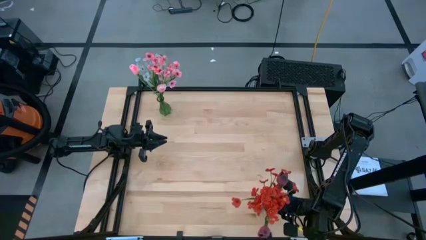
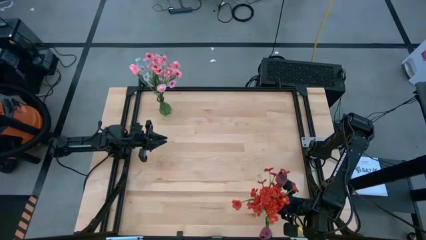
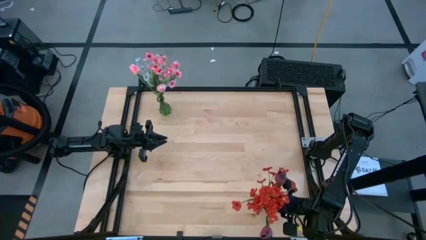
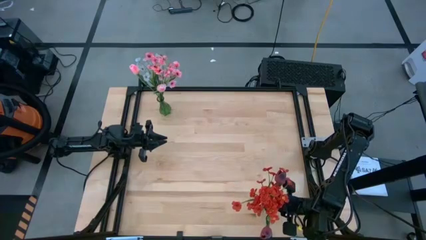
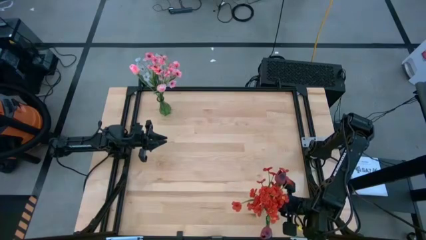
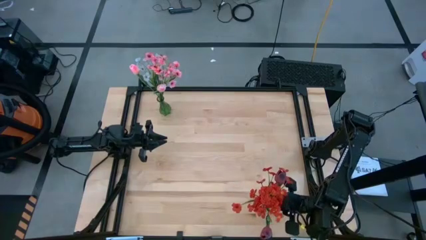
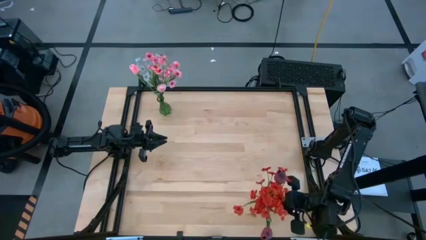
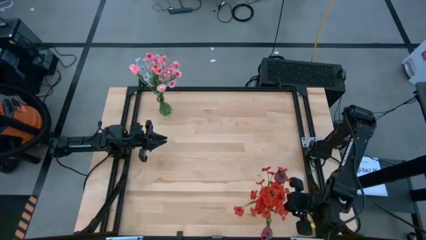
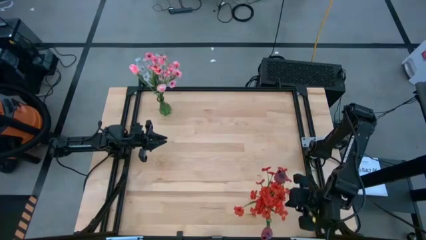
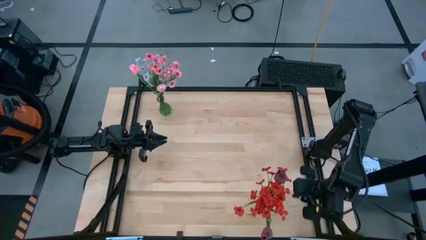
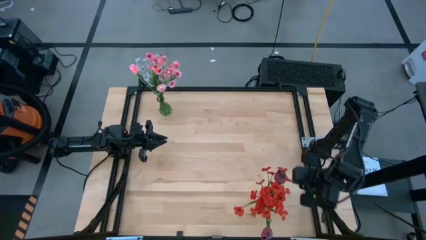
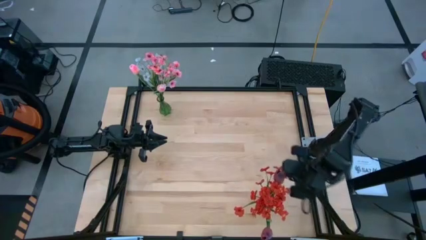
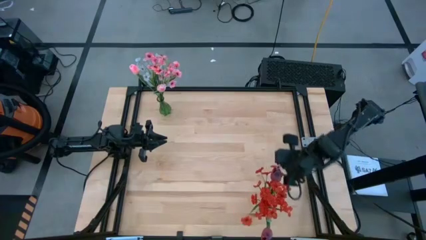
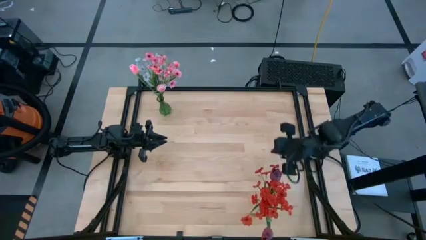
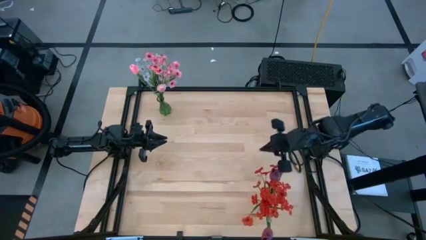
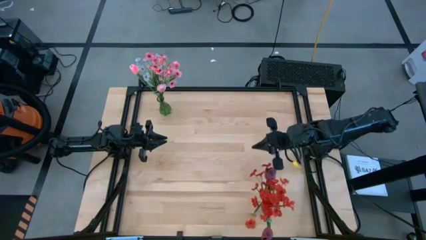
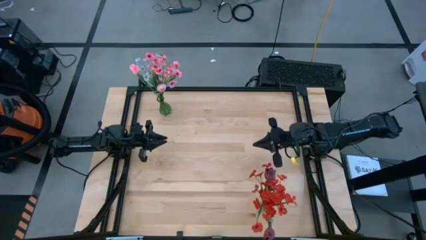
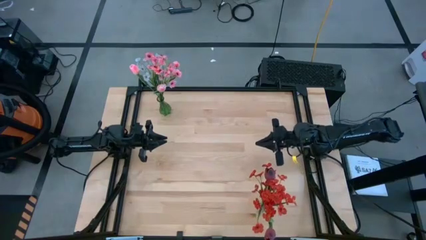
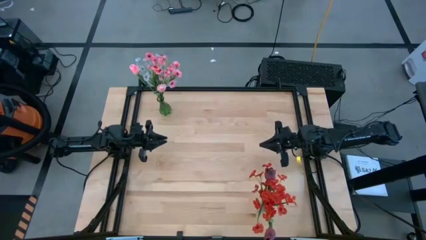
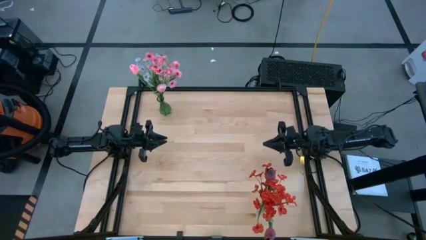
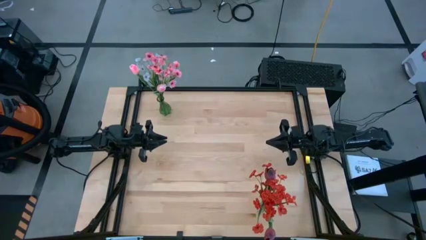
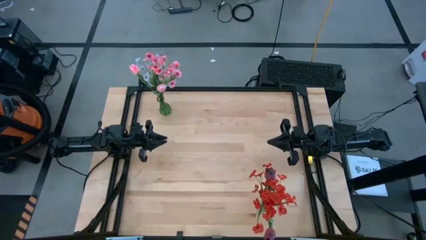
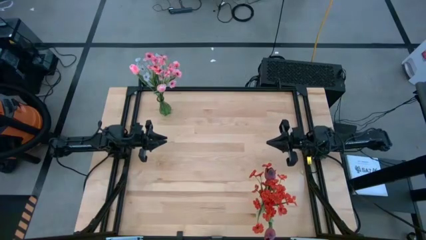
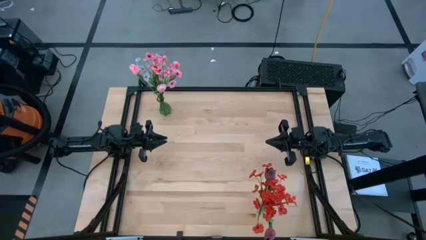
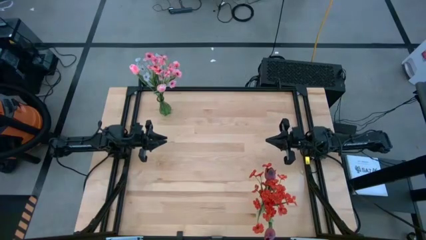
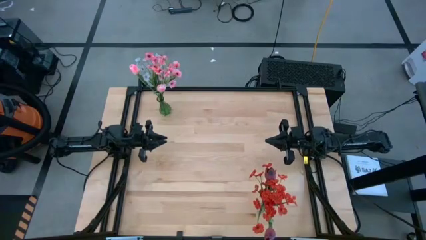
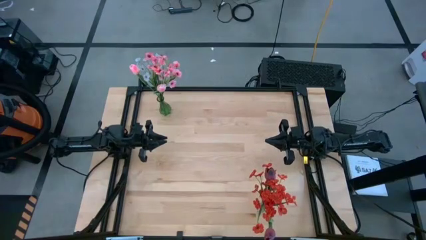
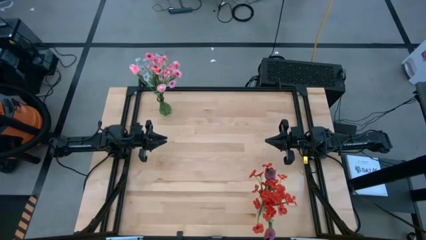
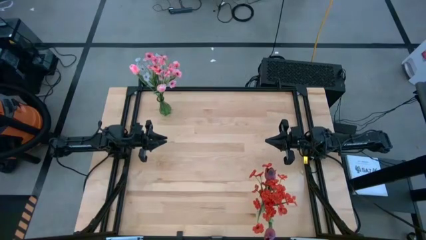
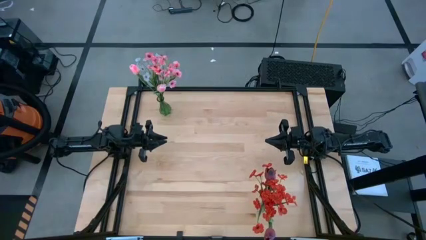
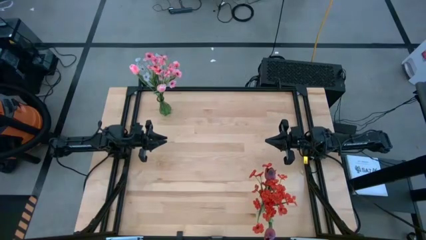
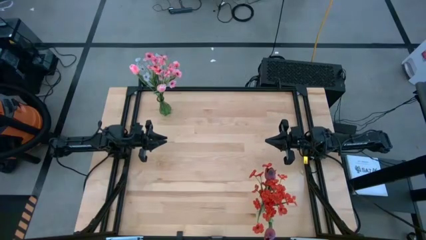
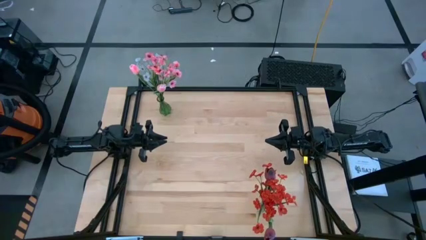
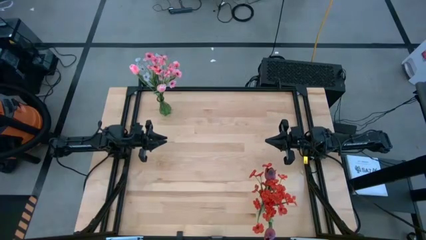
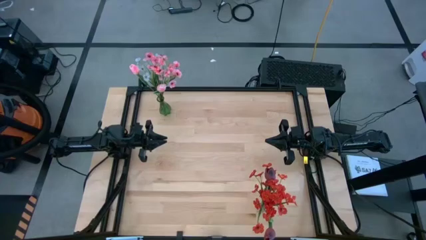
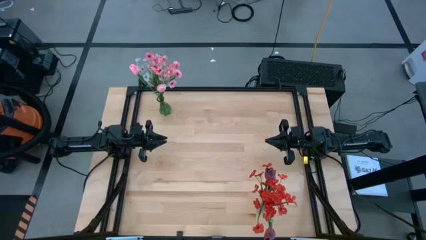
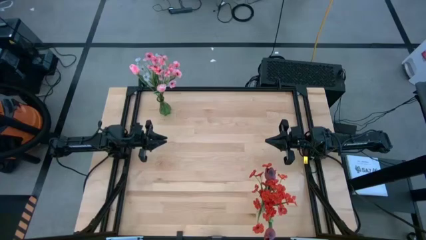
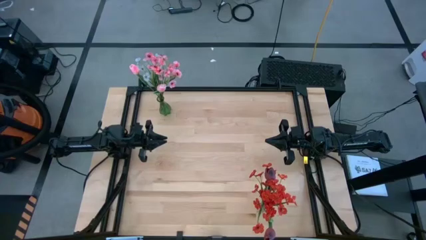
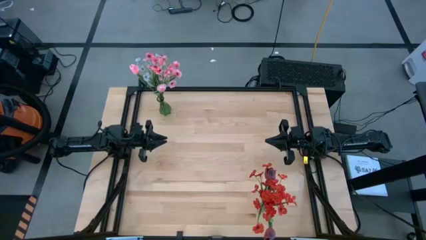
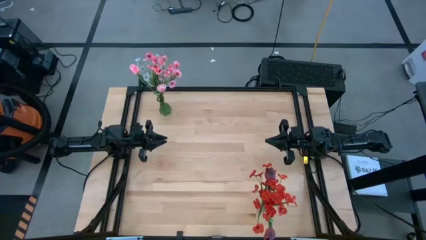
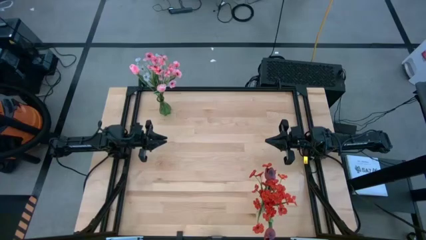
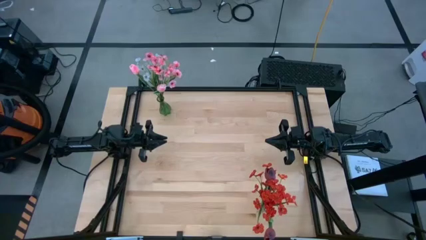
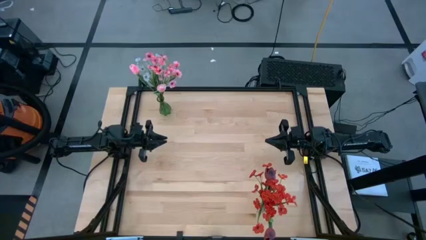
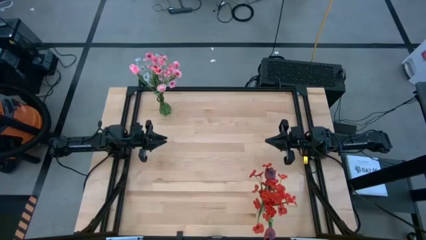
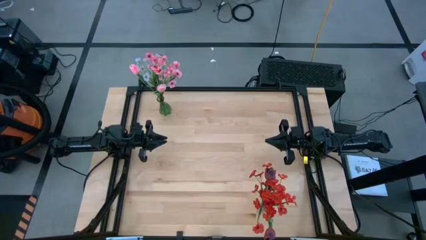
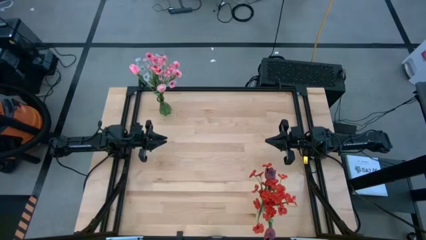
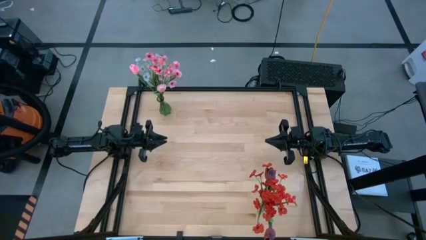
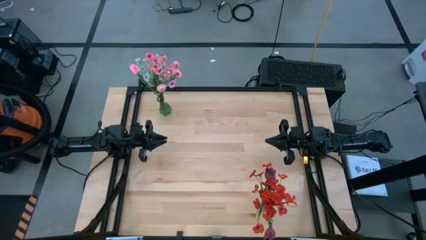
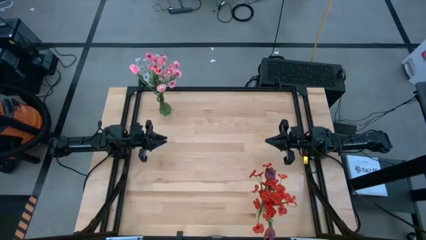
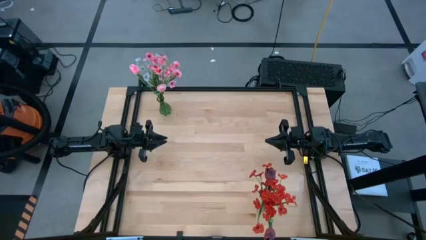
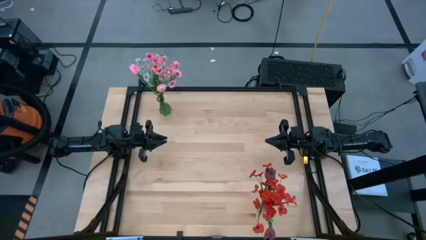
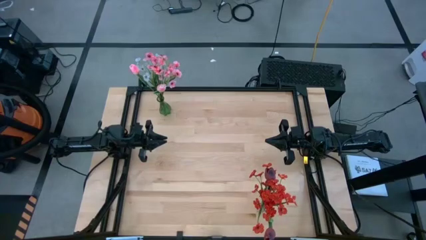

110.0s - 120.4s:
Task: Sort flowers into vase by color
Return to Home Position

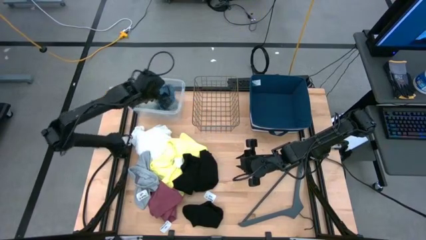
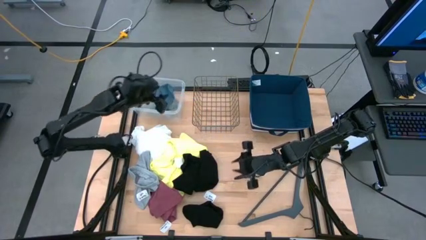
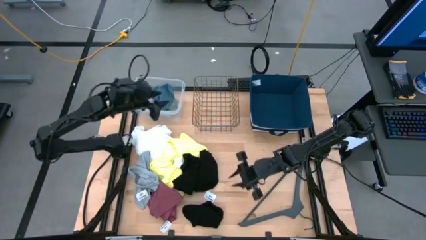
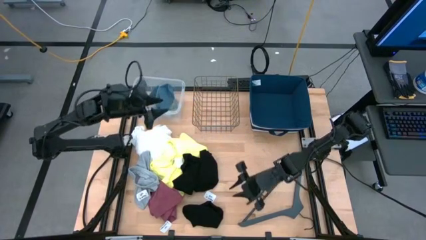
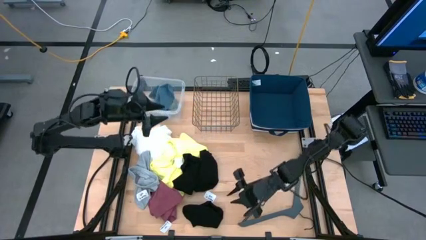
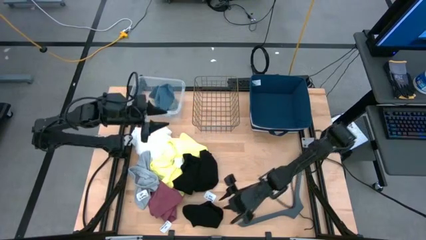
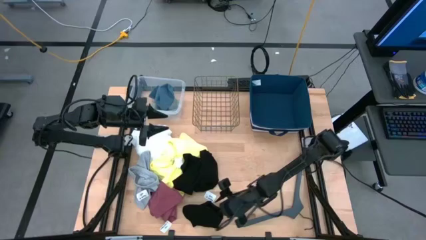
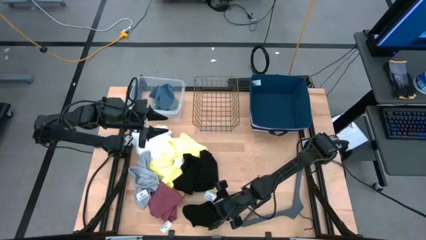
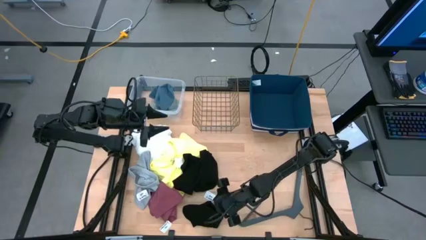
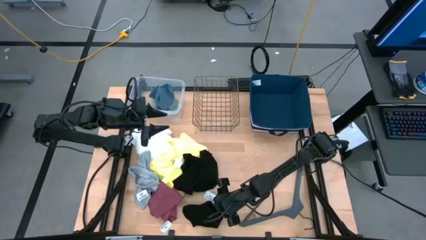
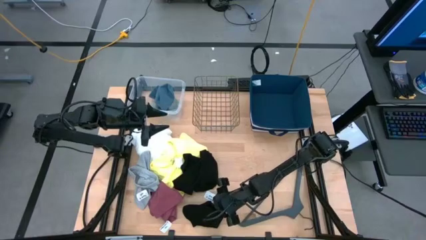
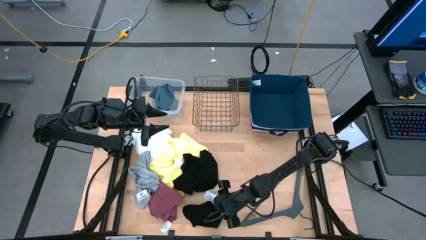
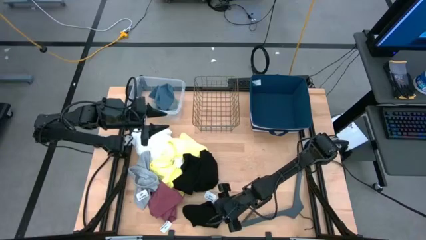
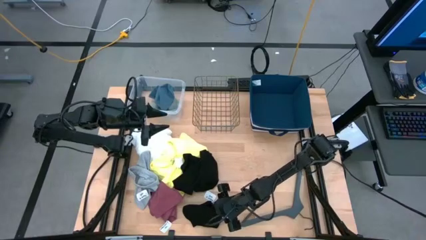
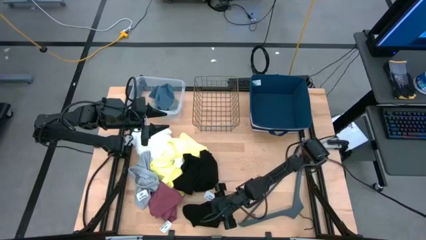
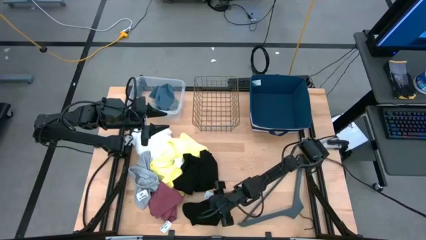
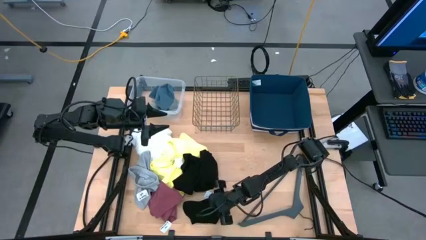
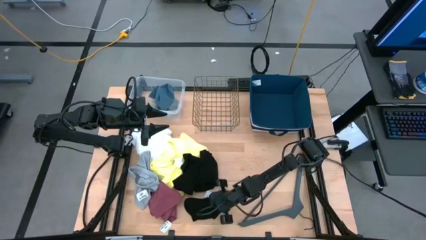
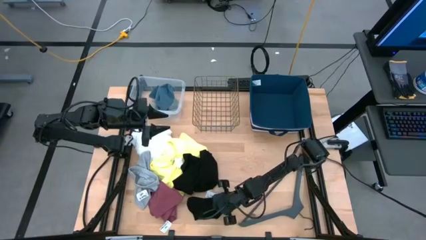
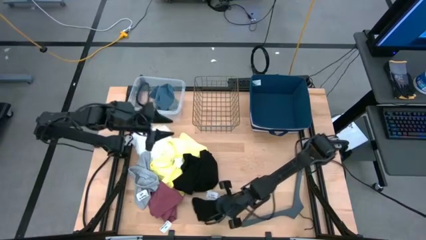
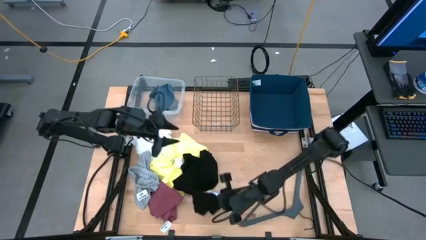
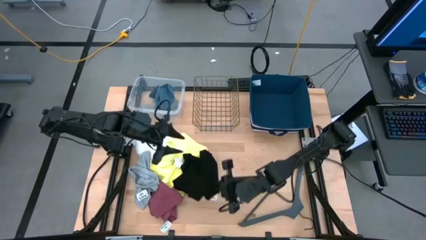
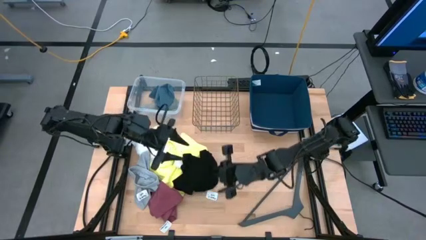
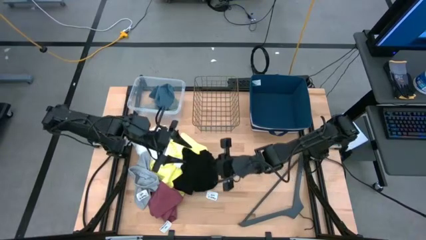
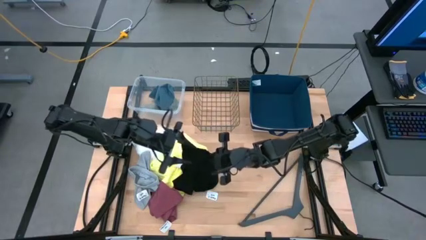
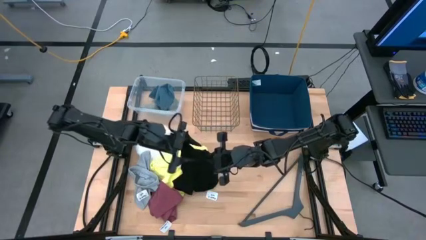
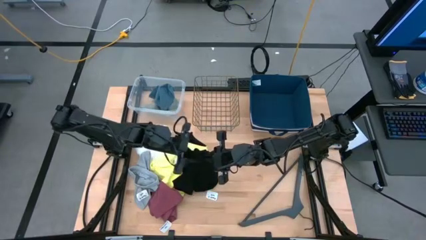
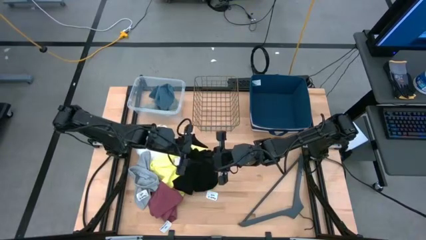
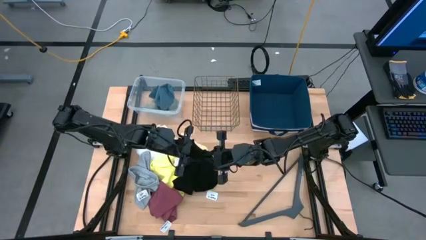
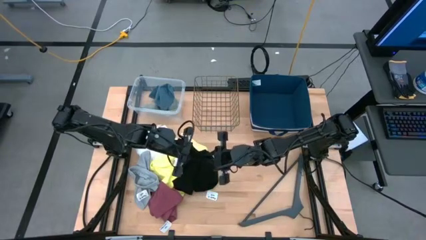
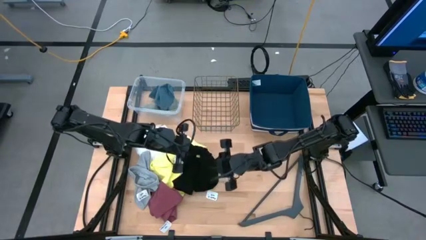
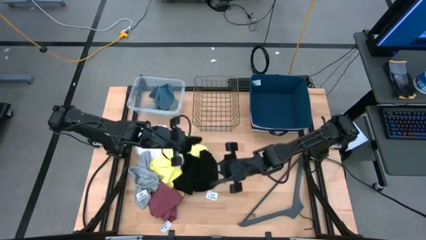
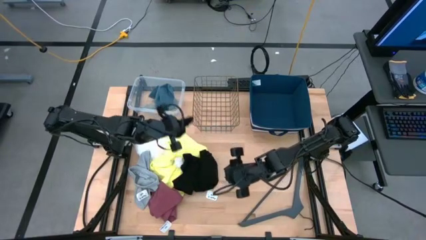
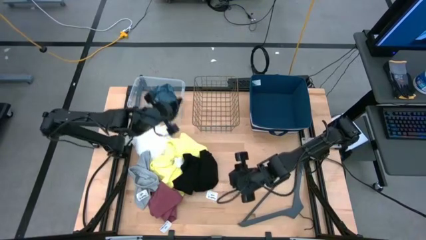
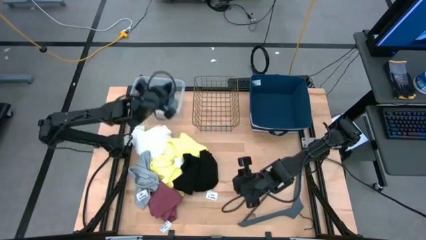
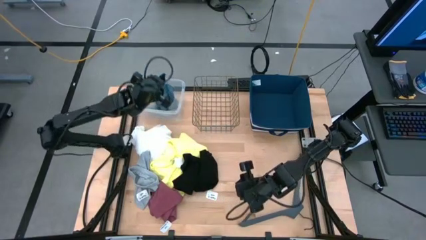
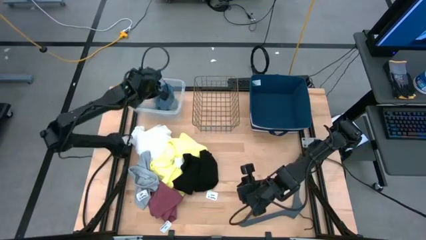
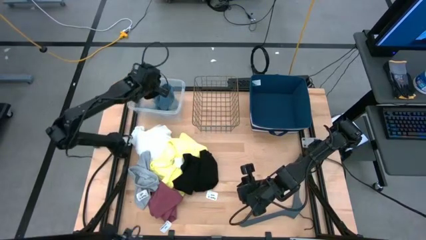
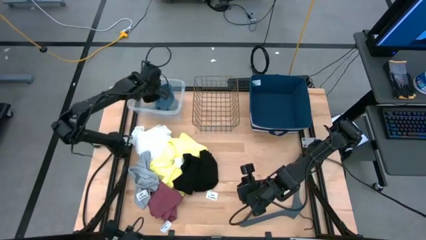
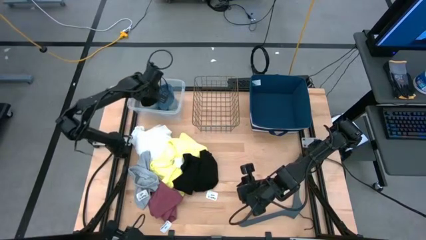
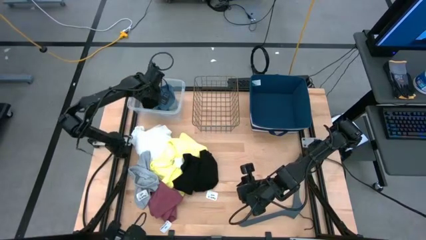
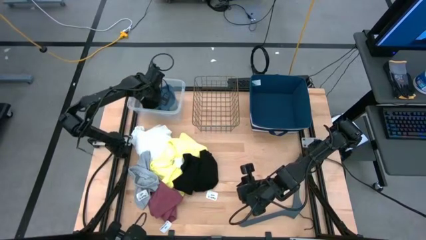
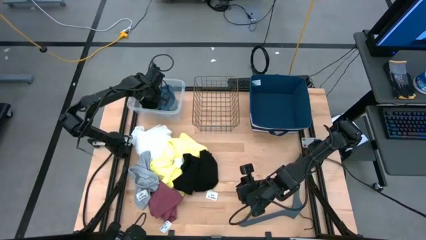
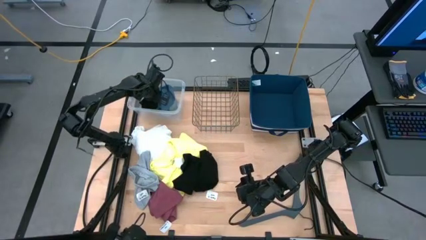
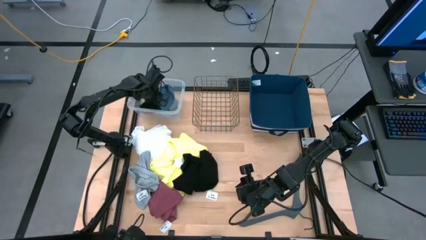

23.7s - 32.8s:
Task: Pick & Place Cloths
Put the black sock into the transparent container
